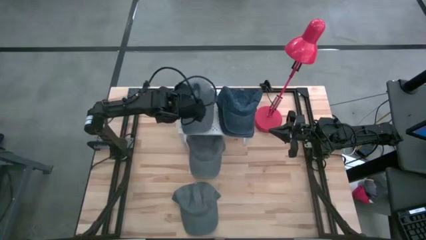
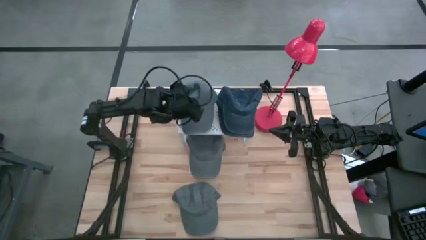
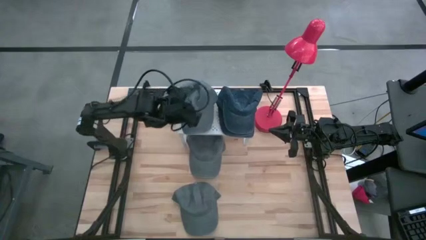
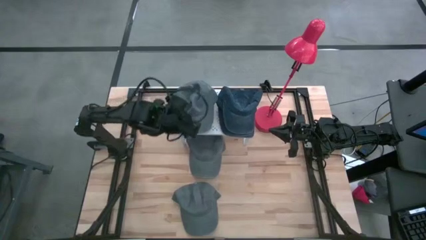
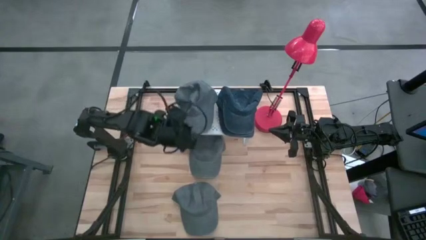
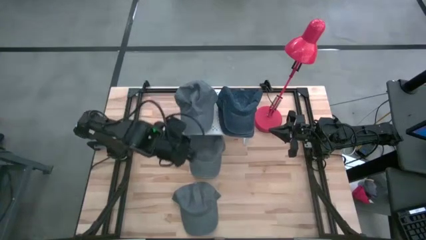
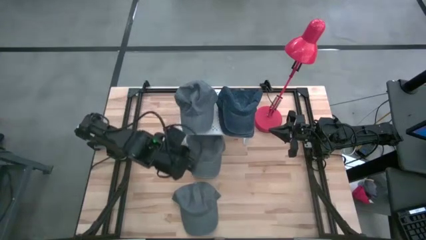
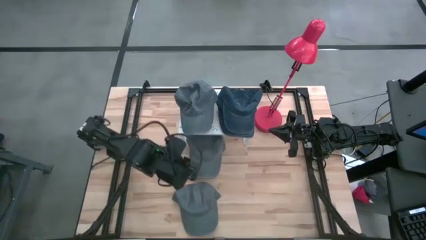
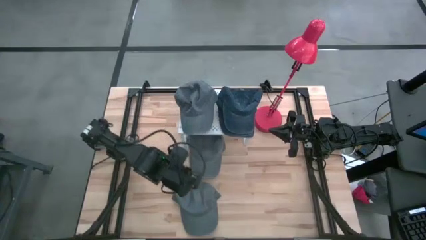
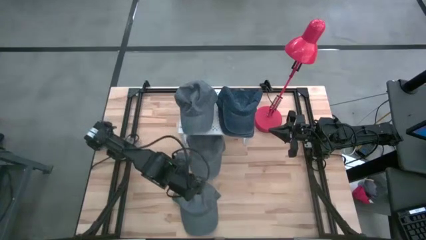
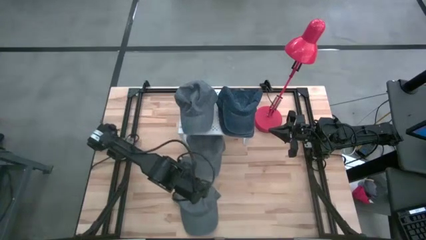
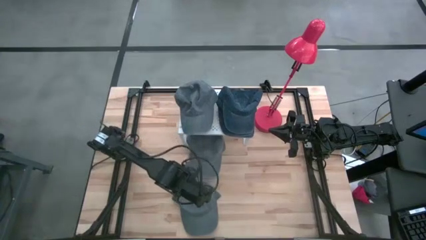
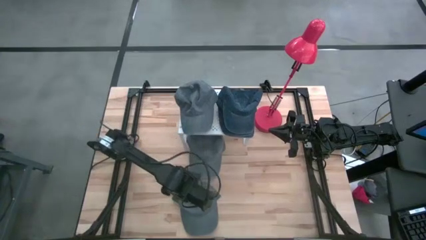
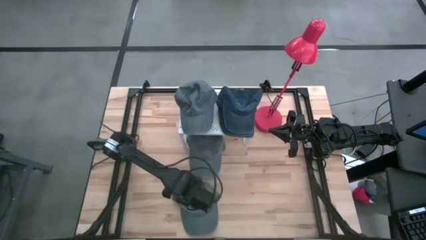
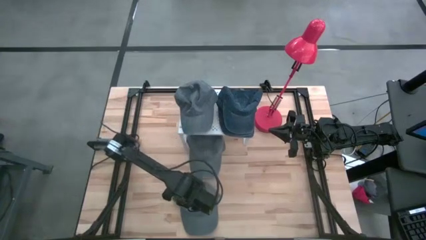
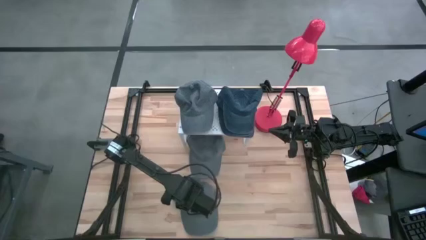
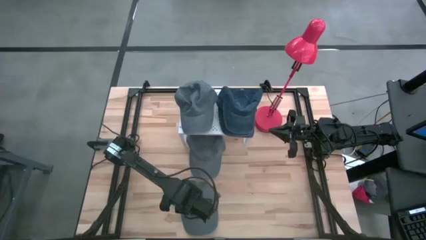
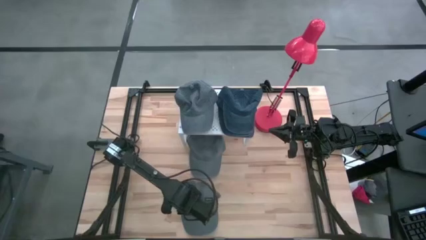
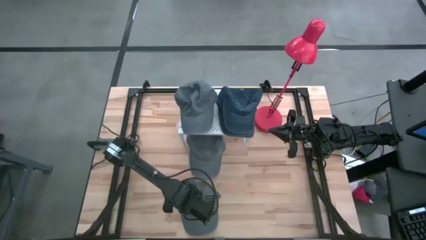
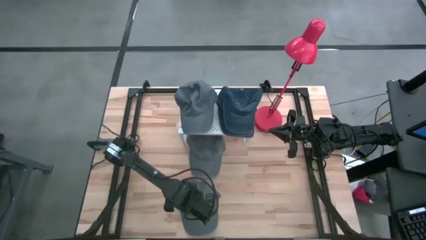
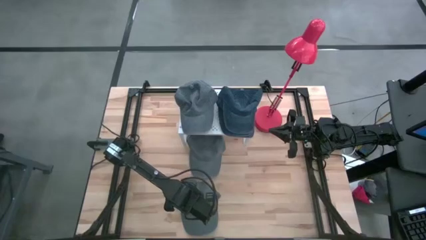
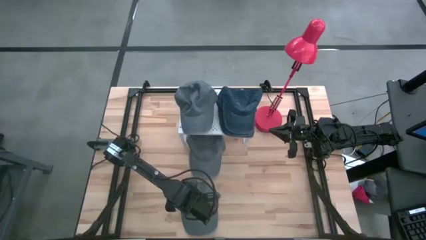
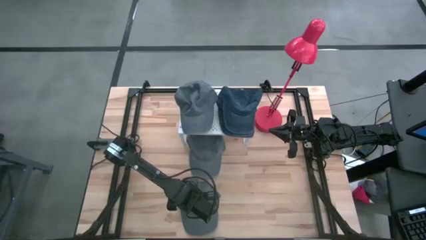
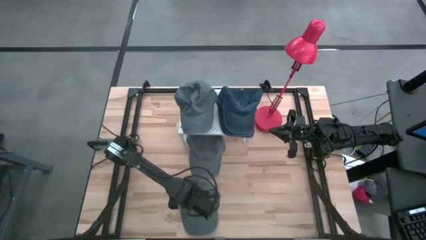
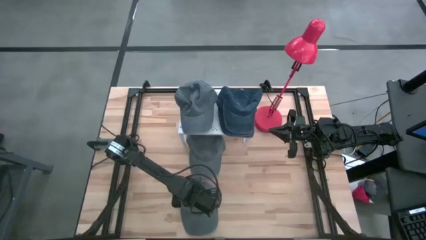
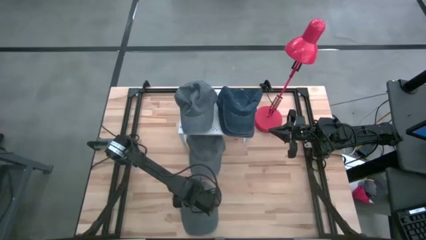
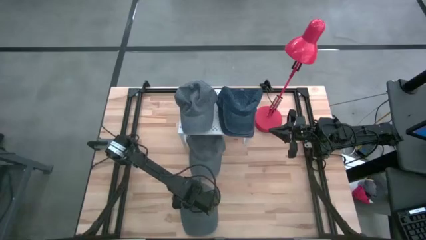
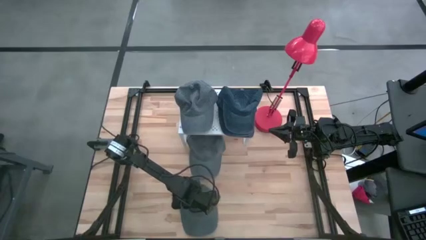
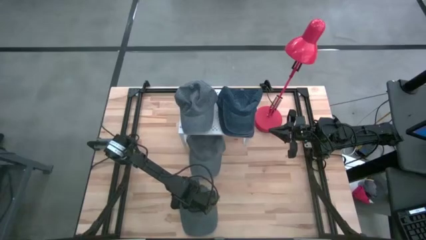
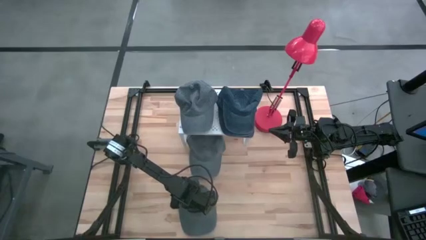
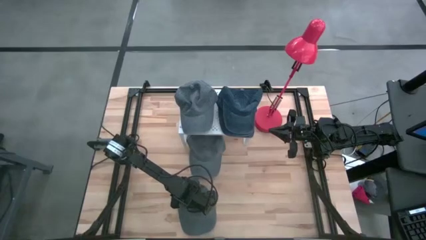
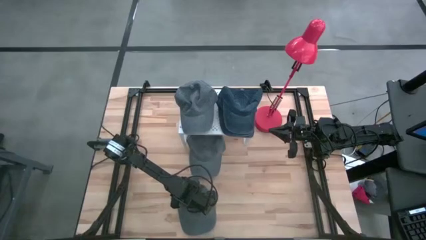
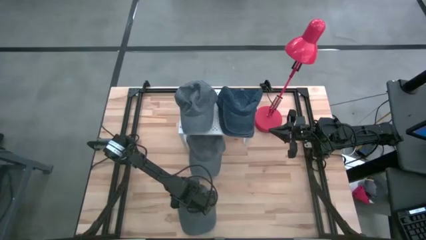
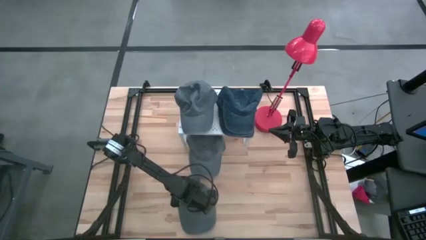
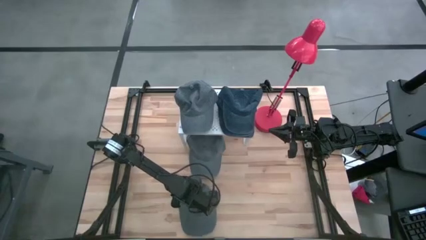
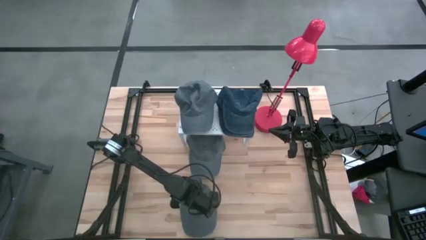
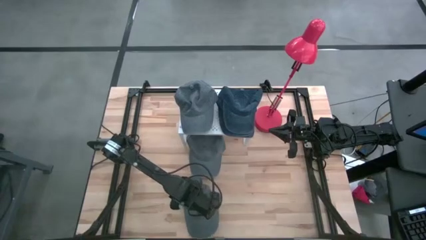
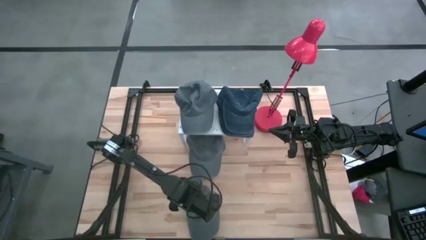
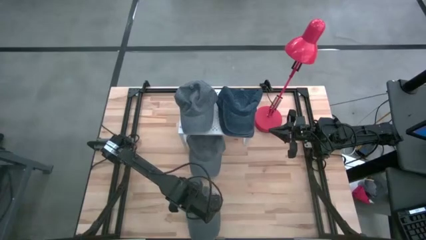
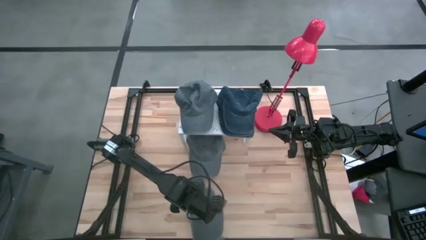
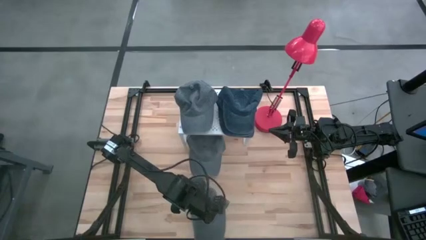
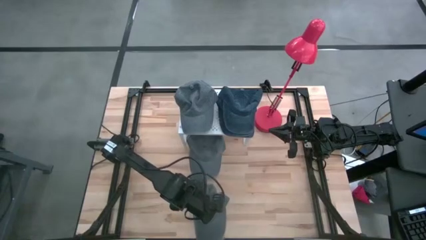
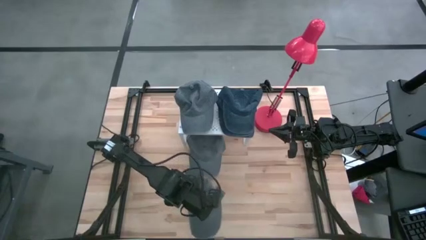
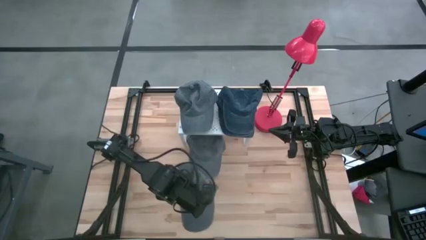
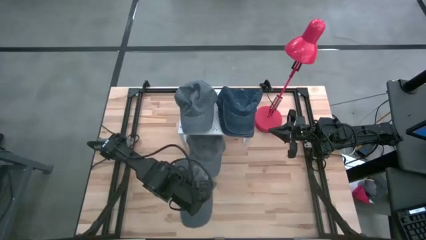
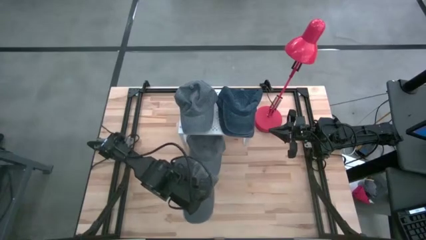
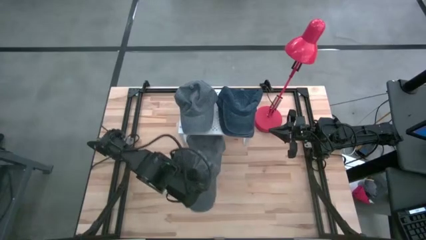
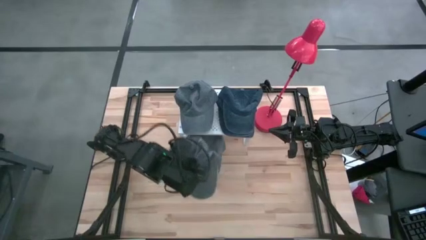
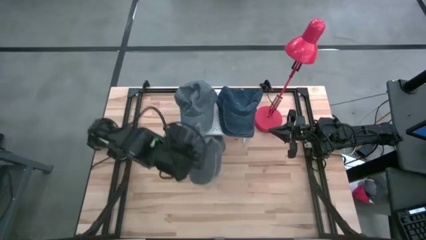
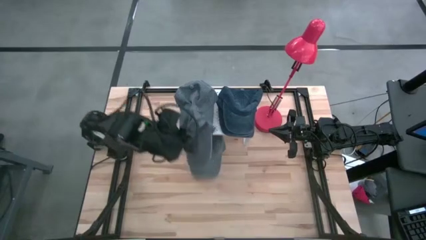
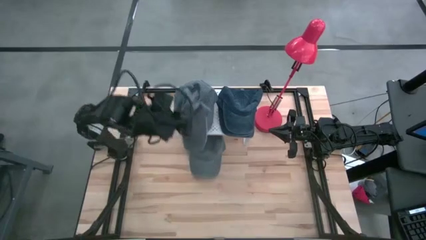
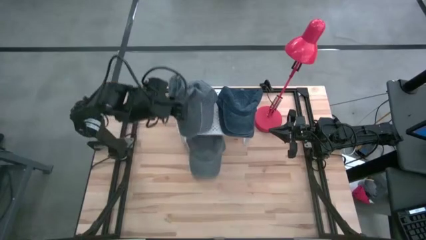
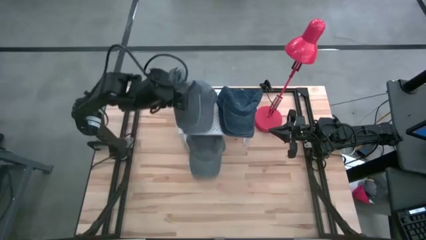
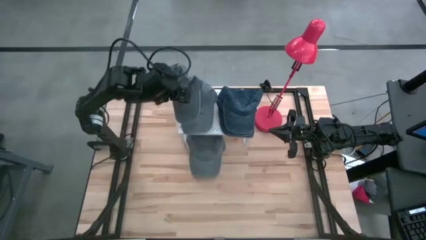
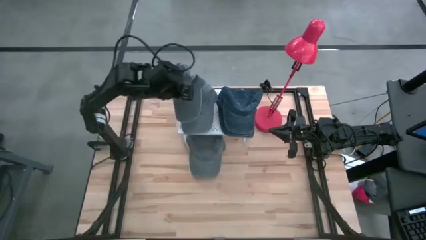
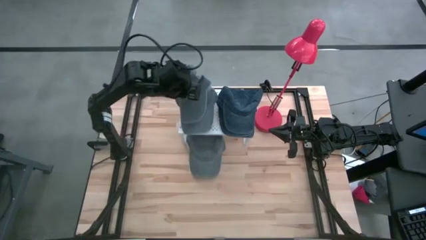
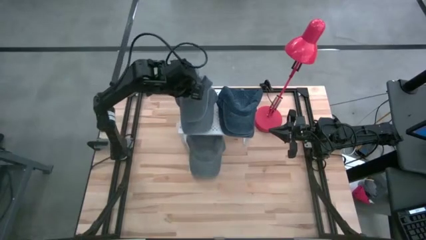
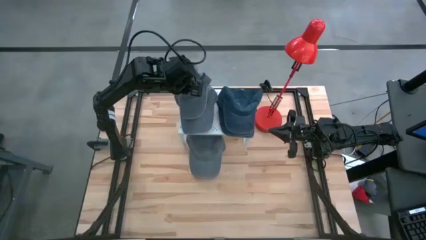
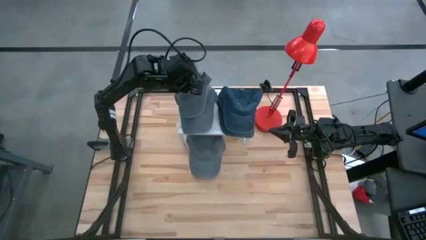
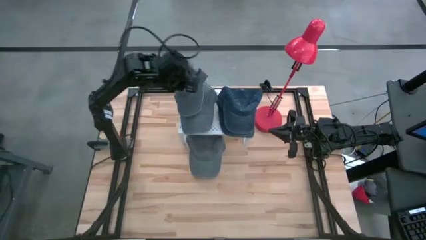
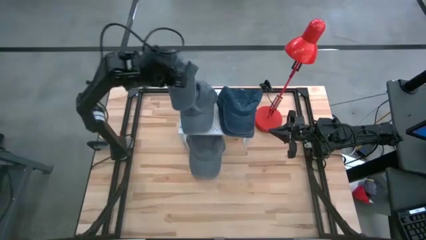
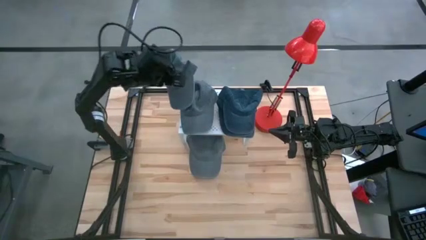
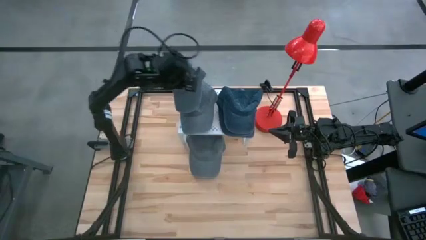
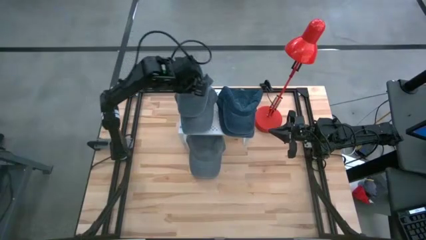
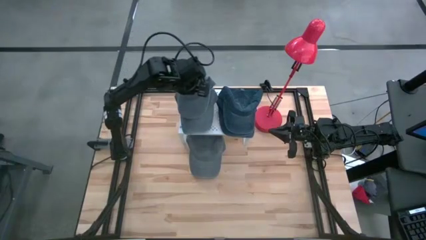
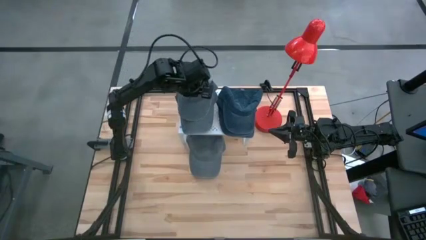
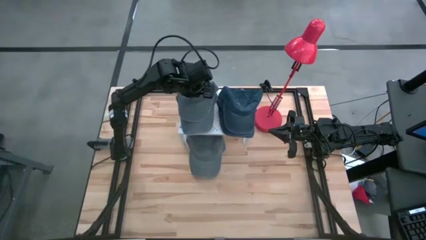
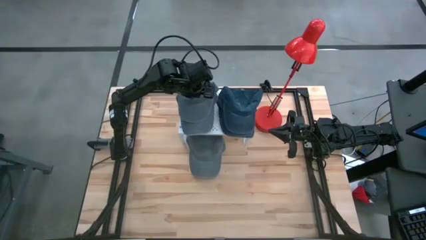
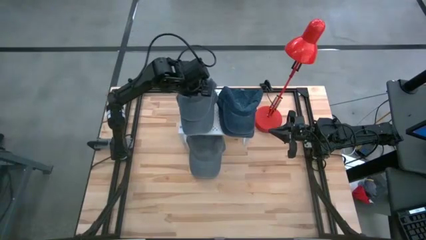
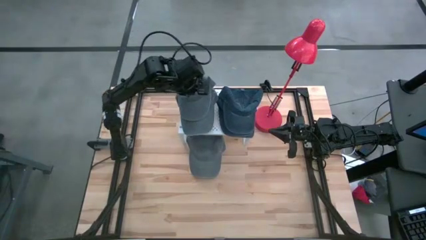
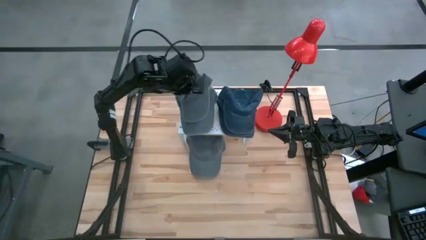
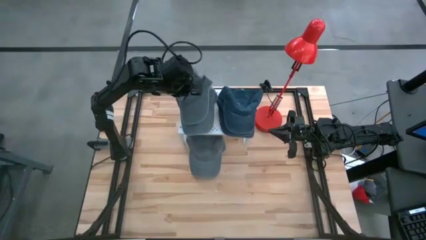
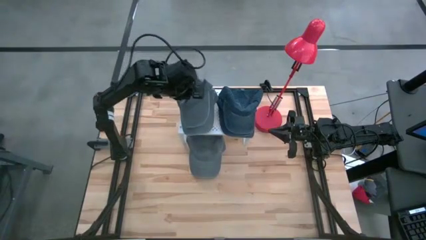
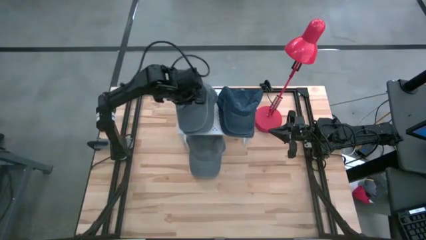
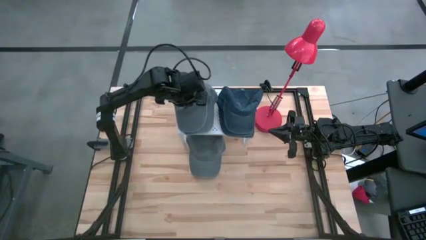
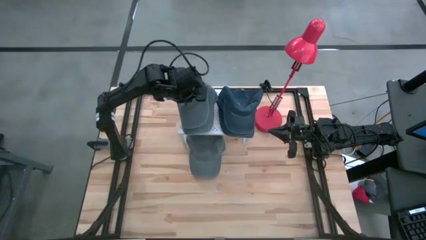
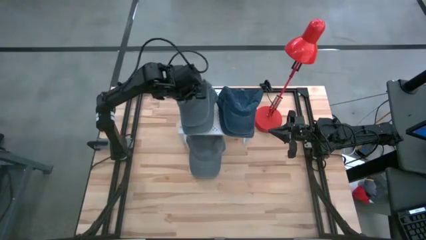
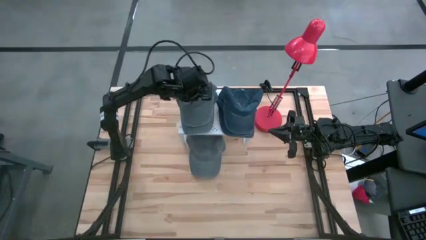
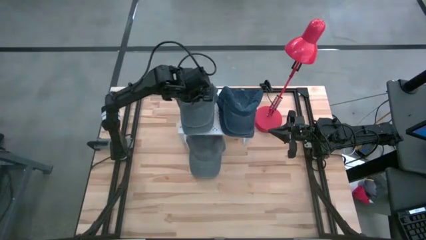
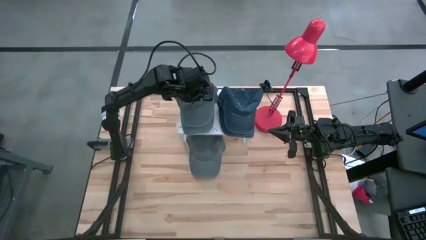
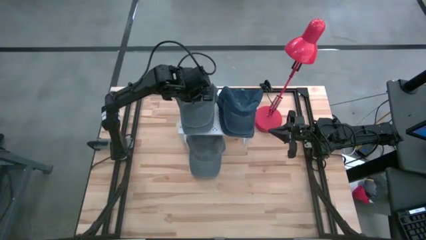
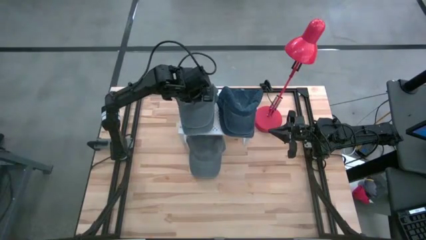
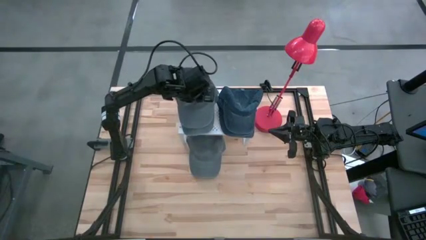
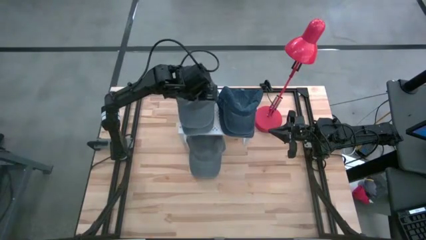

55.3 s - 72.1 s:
Task: Pick & Place hat
Stack the bottom gray cap on top of the gray cap on the shelf

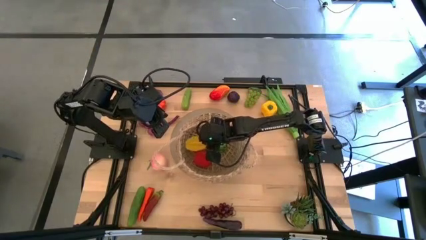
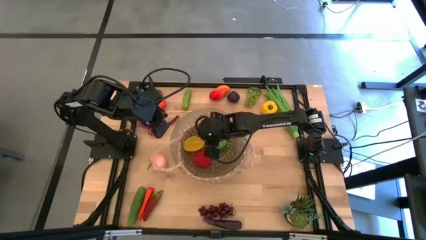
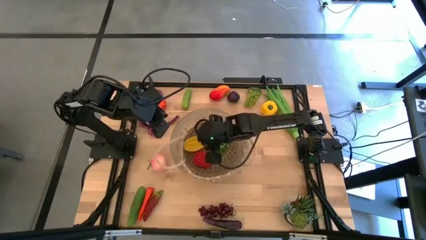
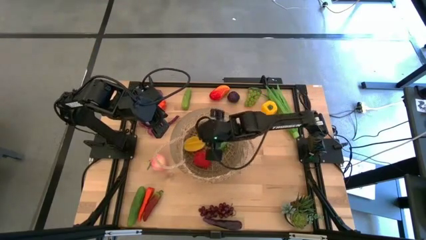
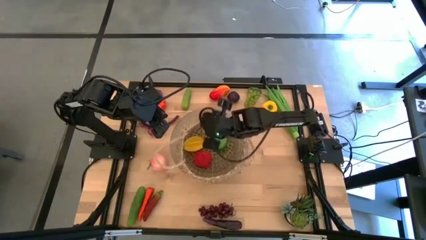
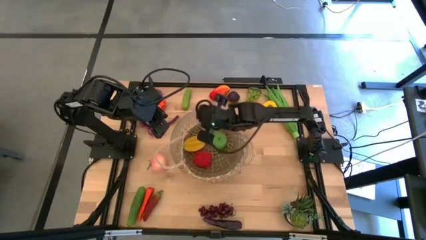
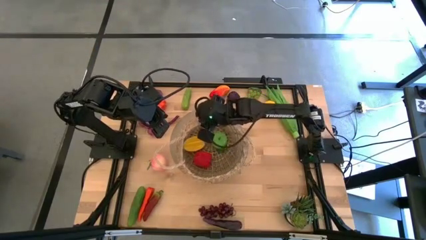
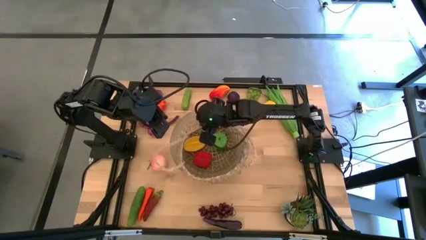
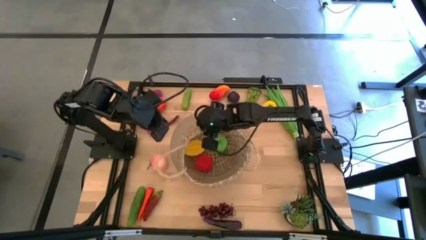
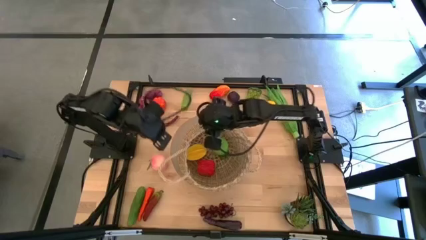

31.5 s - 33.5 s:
Task: Build produce basket
Adjust the brown basket
